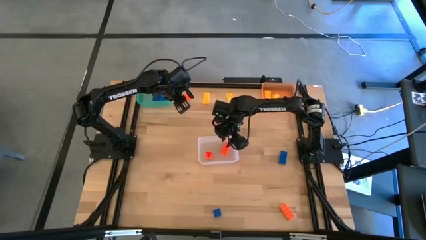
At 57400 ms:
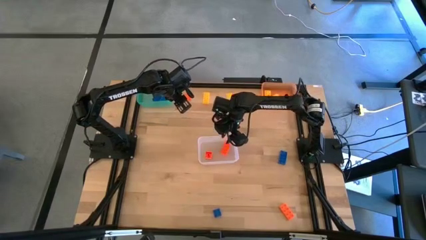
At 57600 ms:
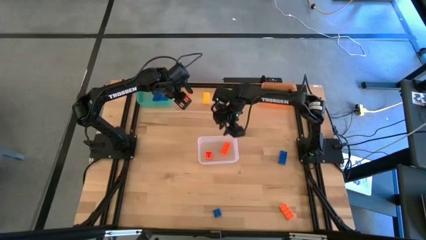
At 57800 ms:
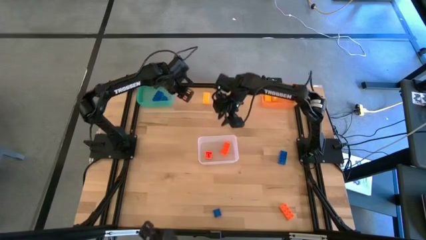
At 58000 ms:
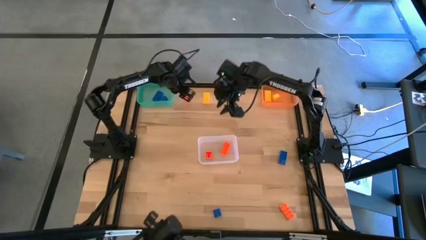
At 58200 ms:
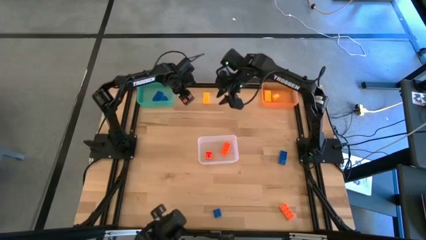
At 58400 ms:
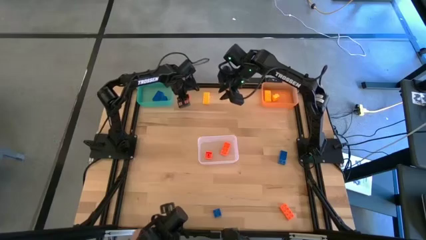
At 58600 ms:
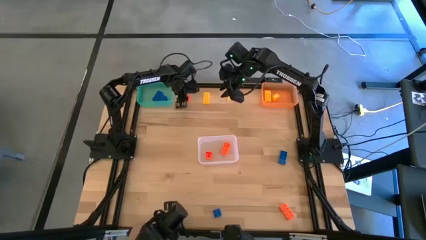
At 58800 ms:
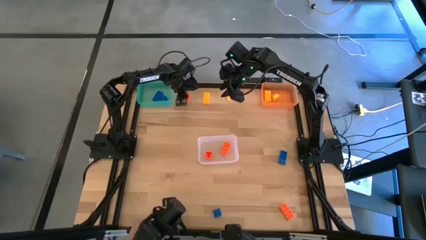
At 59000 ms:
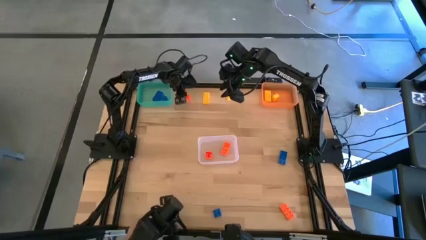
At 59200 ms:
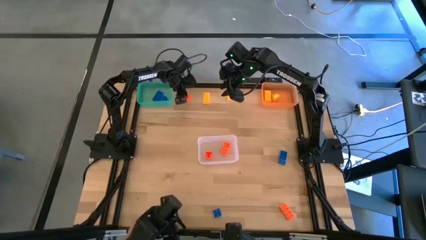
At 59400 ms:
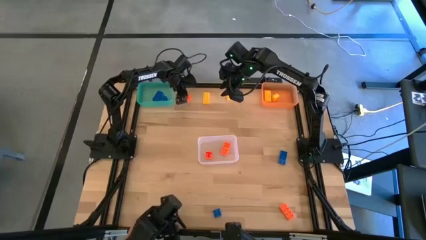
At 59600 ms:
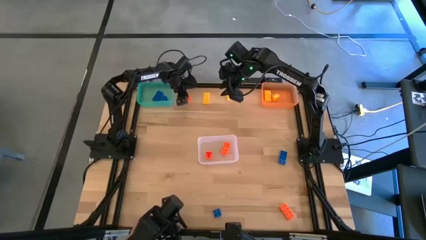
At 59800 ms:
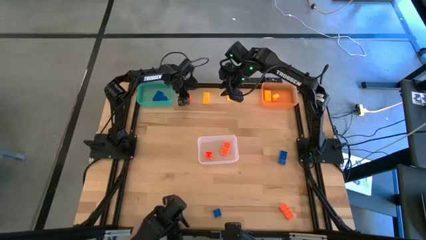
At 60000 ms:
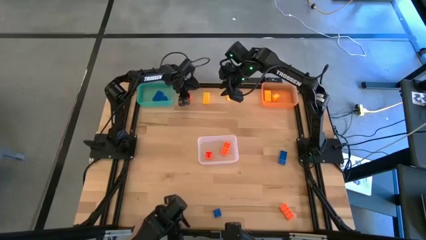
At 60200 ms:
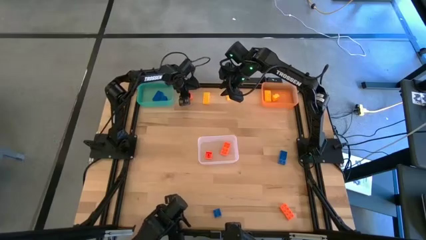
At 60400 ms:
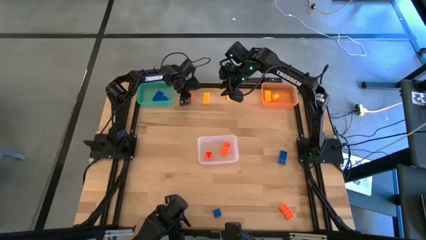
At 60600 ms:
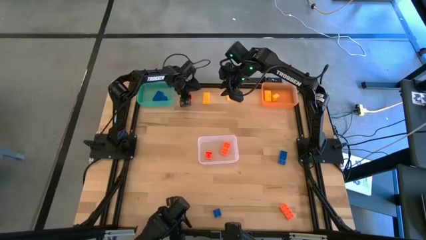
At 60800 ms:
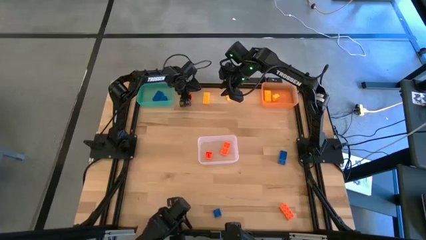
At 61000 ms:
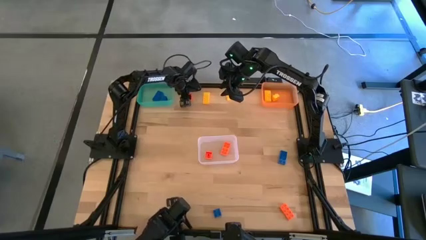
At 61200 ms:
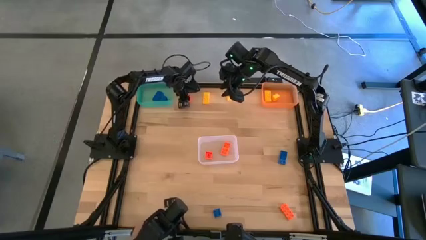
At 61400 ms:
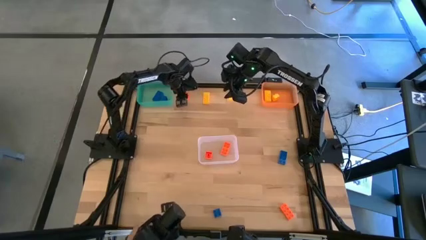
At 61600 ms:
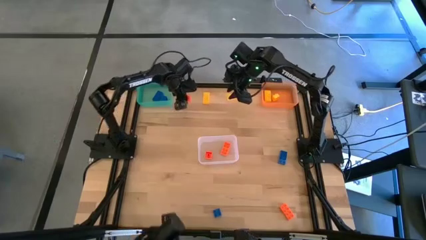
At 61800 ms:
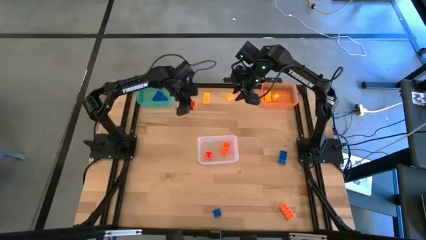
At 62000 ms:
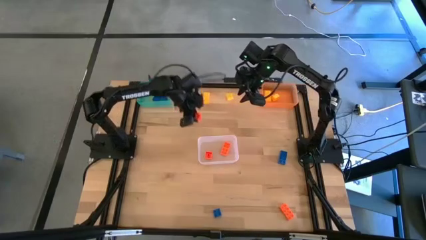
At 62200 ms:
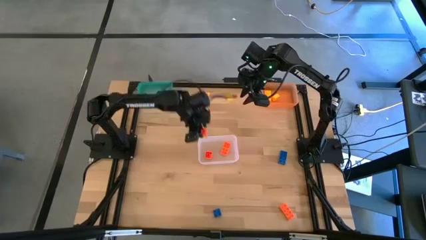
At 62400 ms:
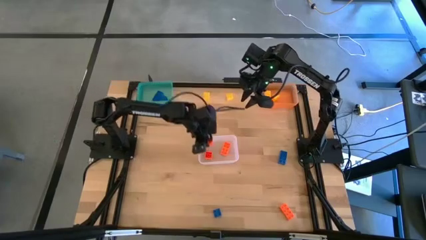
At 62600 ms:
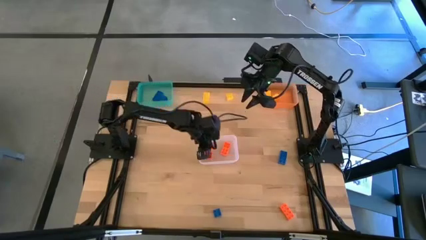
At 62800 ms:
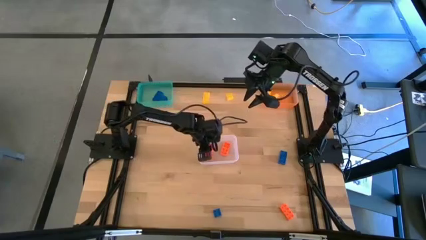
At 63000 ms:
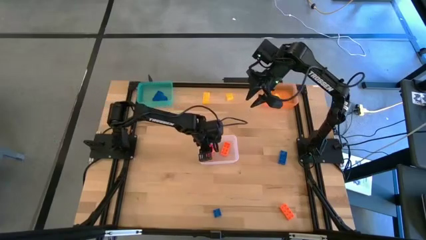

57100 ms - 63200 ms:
Task: Sort & place blocks by color
Put the top orange game piece into the transparent bin

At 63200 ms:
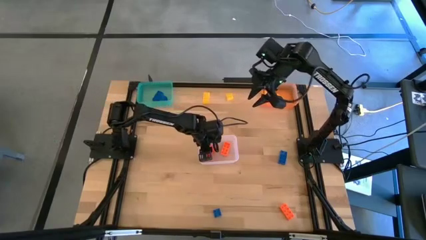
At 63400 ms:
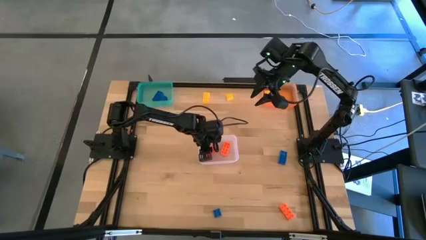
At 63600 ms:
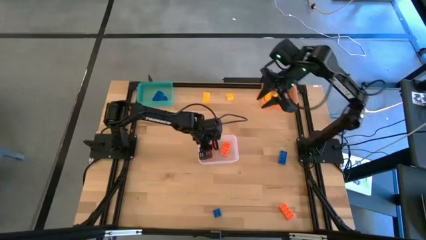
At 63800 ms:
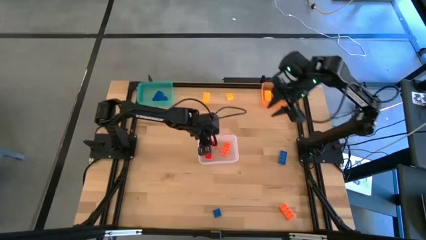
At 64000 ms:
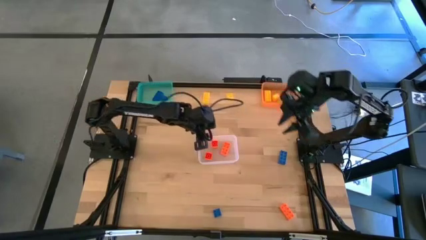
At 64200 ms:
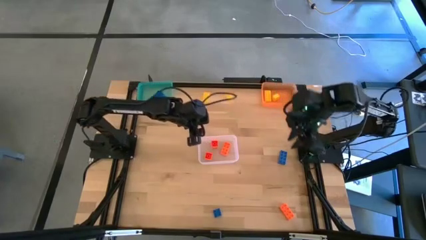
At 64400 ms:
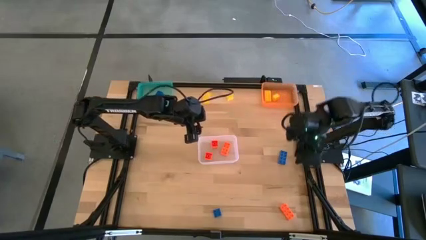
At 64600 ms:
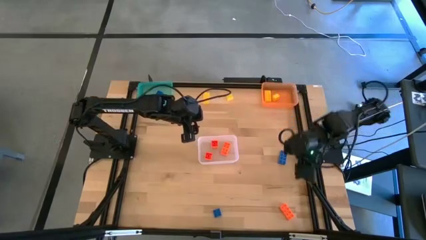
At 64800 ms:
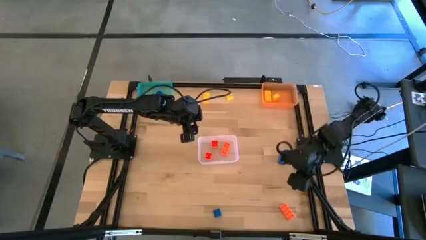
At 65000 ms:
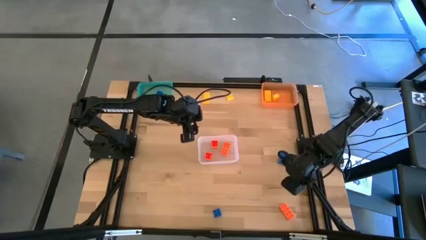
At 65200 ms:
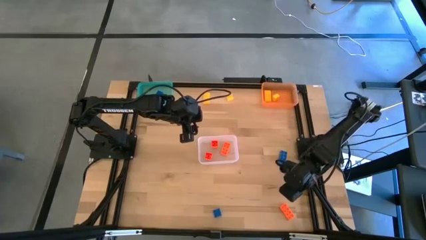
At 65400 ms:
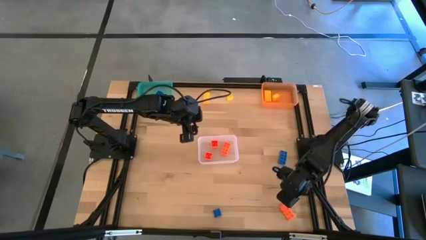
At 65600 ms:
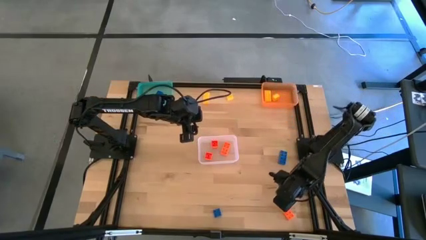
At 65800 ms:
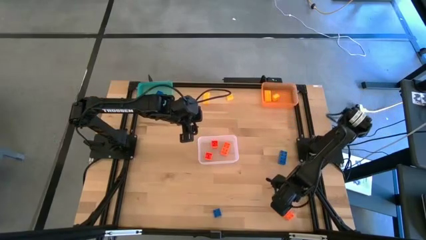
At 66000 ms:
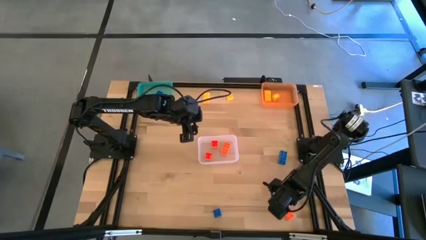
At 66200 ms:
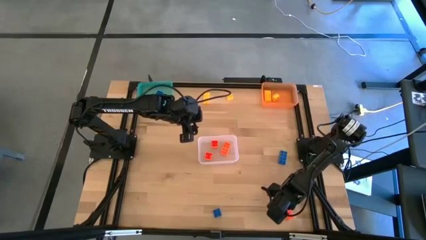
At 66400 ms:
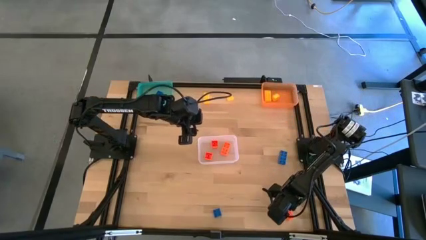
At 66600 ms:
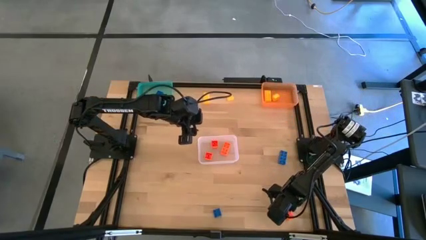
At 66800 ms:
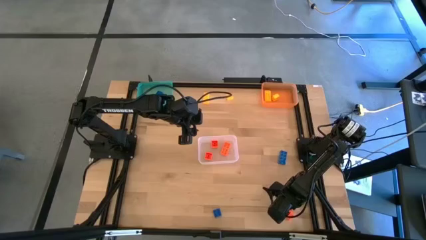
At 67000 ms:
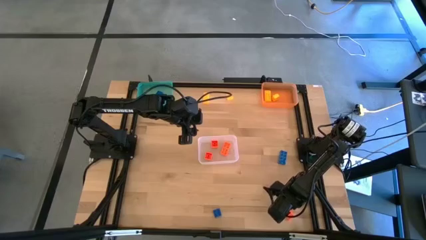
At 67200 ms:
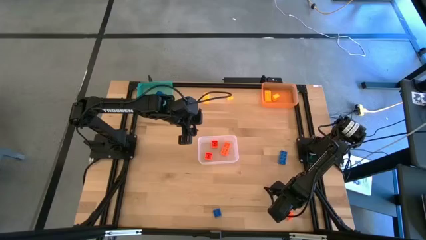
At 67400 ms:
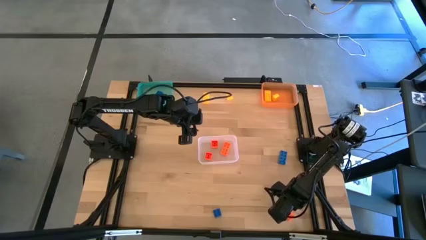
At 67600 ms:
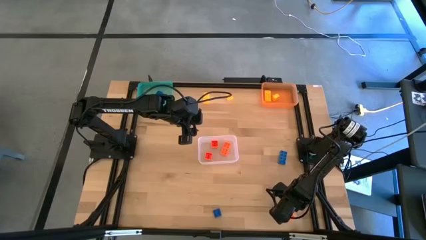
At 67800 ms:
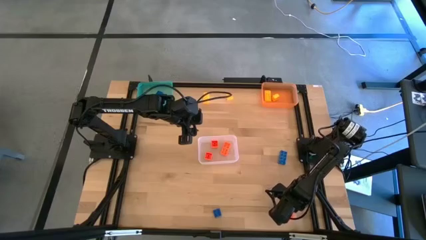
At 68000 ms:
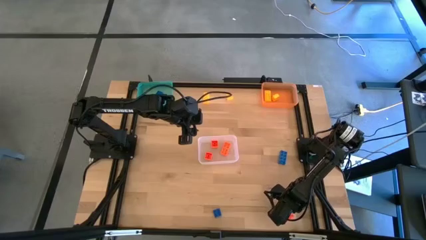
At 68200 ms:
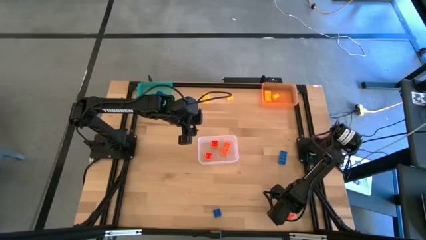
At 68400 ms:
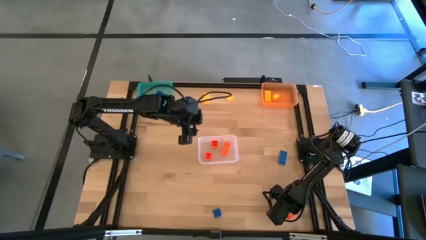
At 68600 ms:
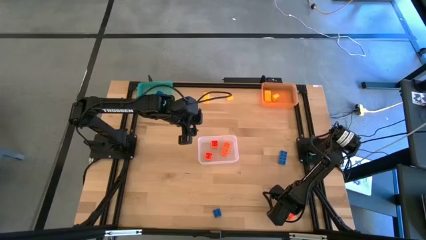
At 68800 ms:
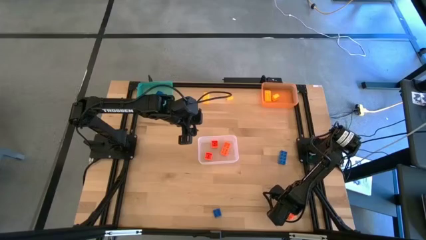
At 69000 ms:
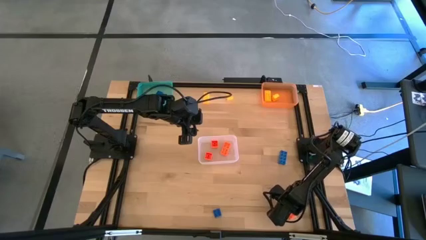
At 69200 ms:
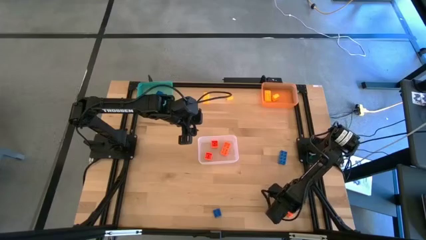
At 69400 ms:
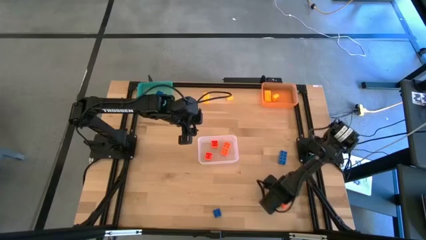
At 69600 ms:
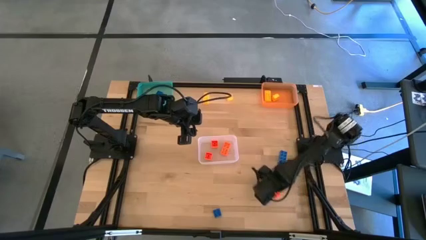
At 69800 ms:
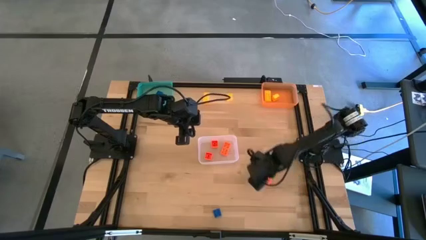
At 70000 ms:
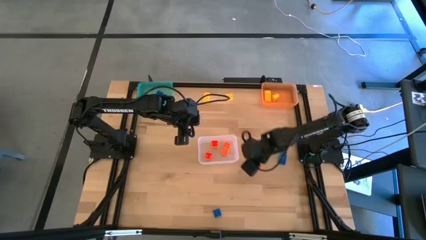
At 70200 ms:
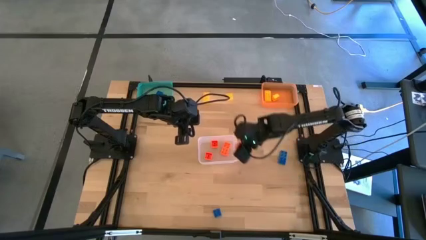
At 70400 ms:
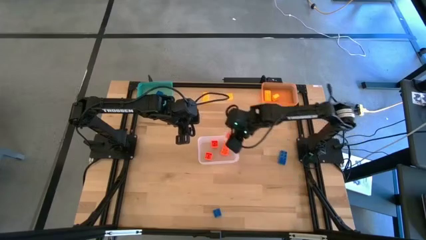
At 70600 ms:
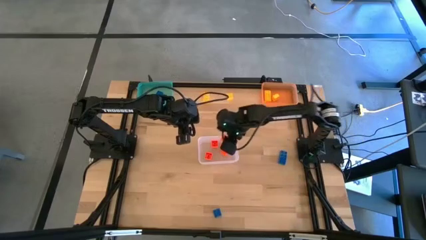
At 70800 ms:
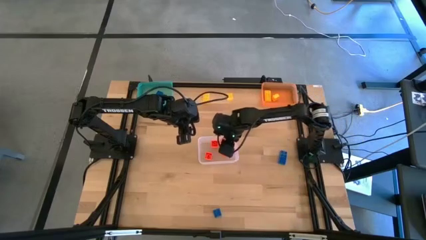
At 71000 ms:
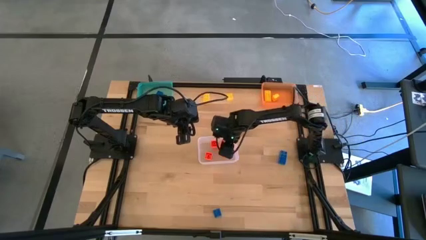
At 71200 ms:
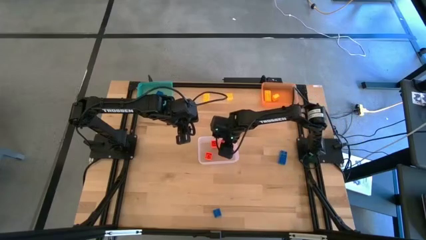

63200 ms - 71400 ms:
Put the orange game piece into the transparent bin
